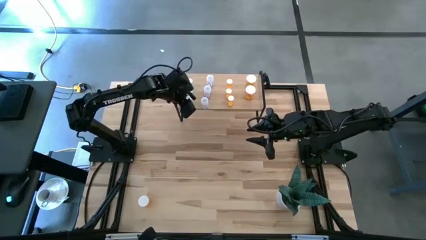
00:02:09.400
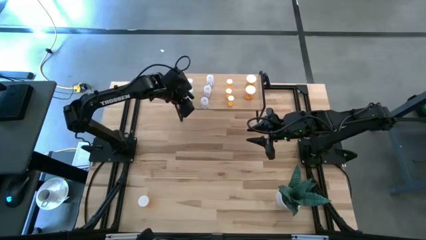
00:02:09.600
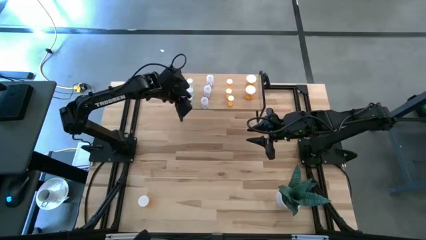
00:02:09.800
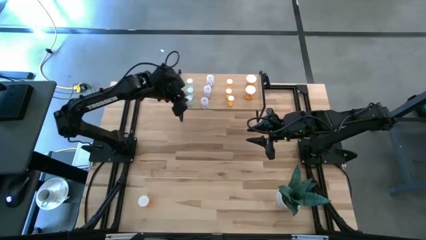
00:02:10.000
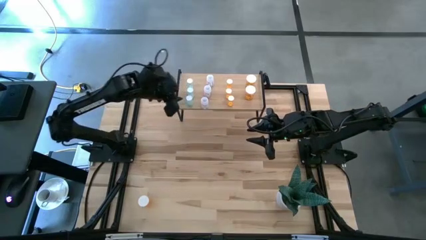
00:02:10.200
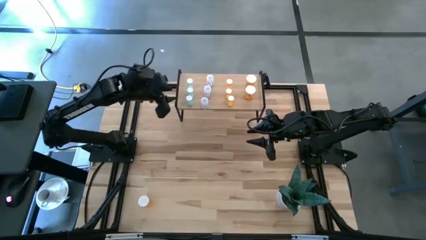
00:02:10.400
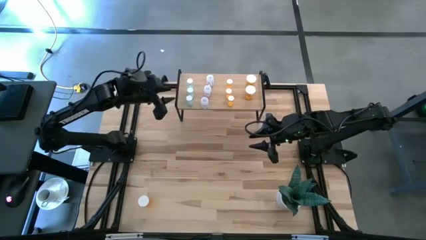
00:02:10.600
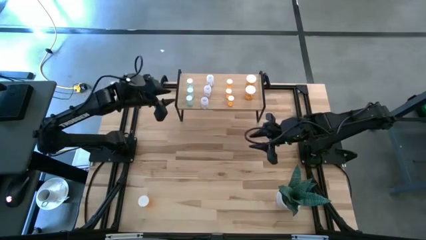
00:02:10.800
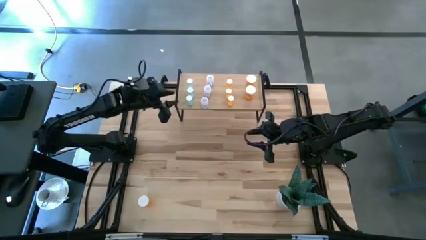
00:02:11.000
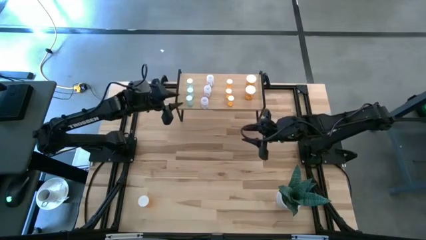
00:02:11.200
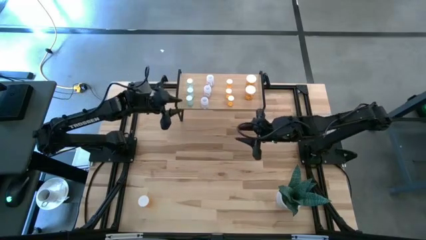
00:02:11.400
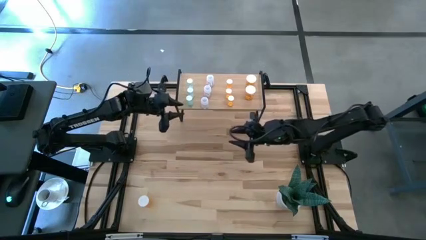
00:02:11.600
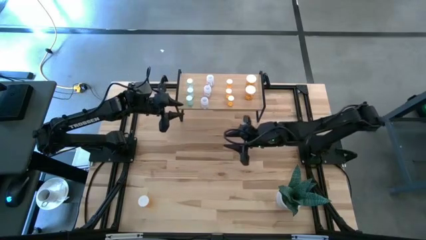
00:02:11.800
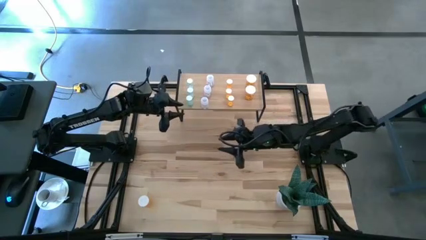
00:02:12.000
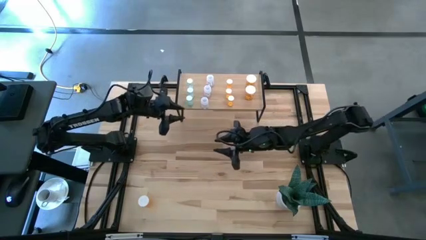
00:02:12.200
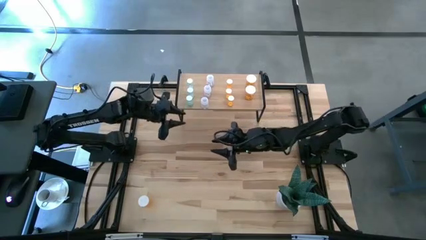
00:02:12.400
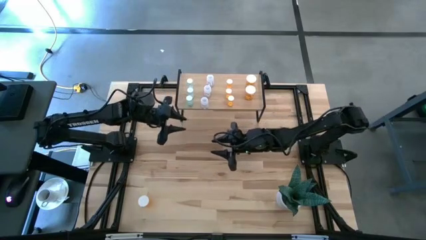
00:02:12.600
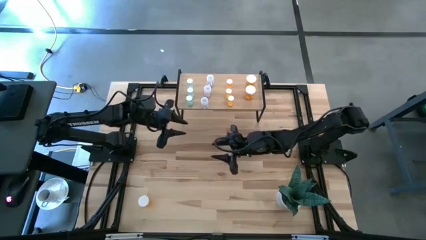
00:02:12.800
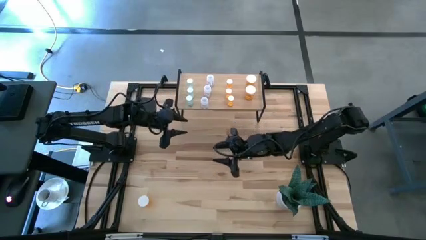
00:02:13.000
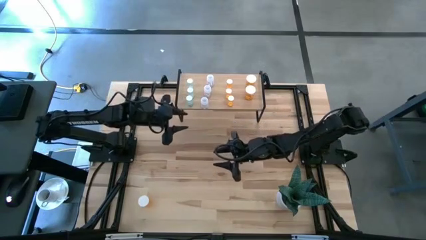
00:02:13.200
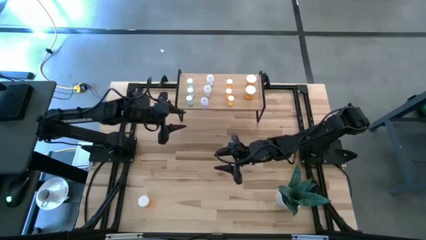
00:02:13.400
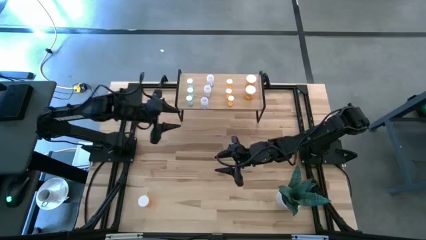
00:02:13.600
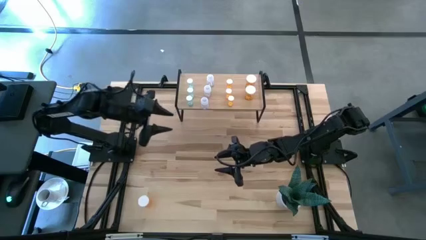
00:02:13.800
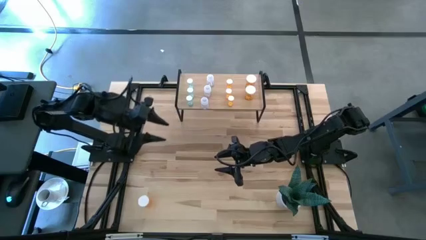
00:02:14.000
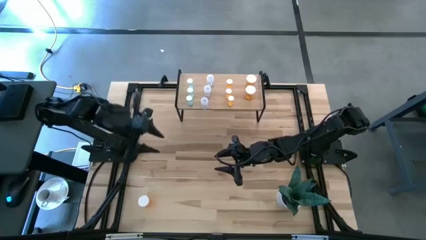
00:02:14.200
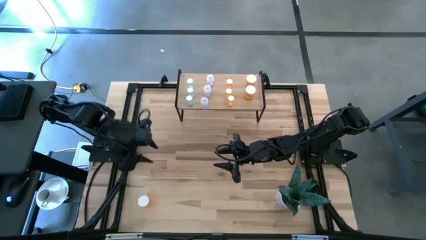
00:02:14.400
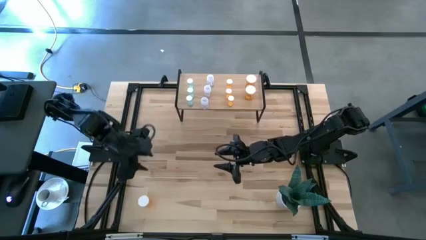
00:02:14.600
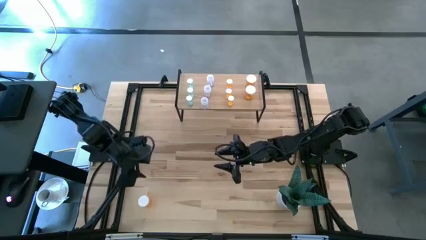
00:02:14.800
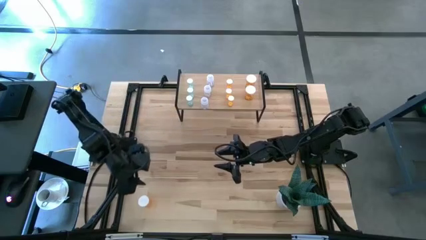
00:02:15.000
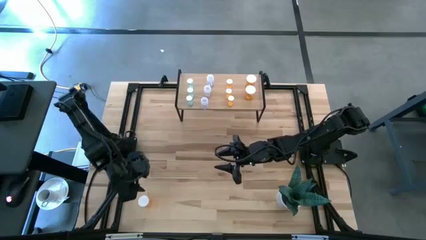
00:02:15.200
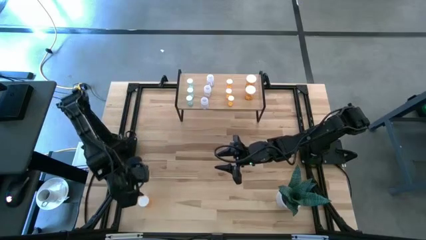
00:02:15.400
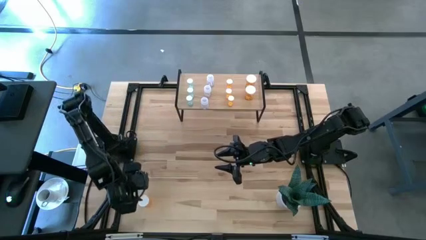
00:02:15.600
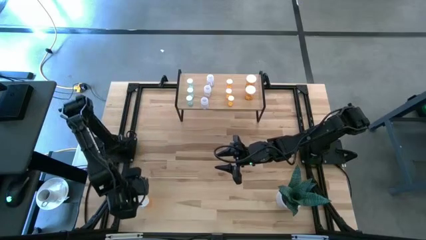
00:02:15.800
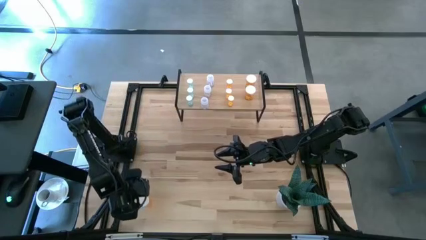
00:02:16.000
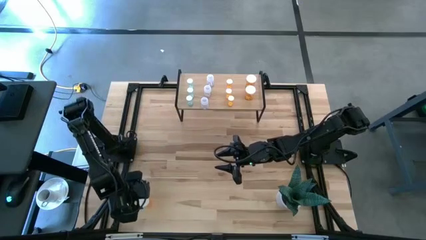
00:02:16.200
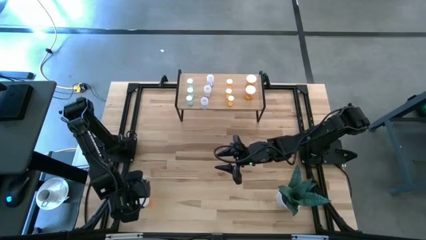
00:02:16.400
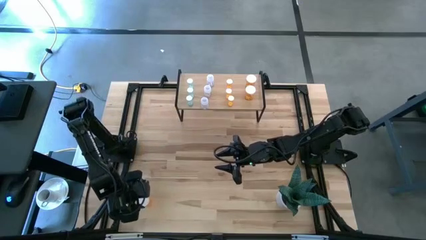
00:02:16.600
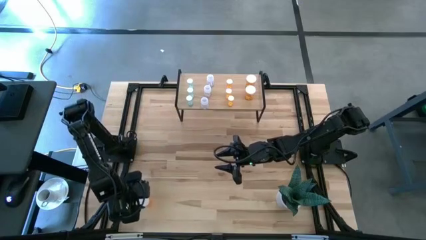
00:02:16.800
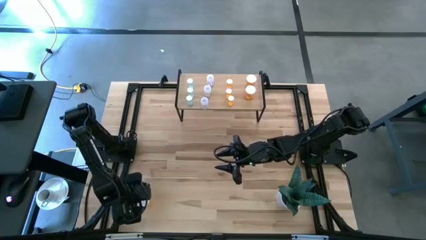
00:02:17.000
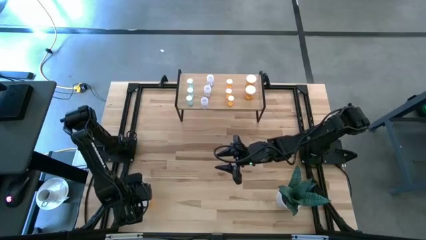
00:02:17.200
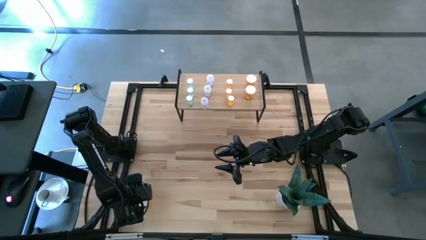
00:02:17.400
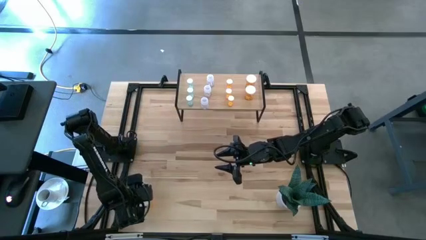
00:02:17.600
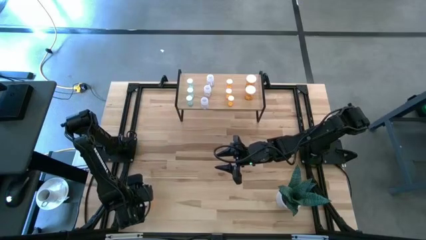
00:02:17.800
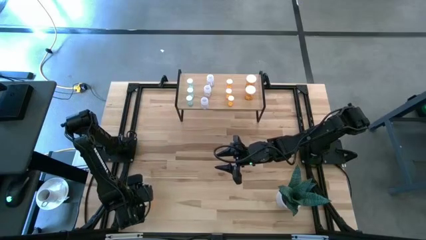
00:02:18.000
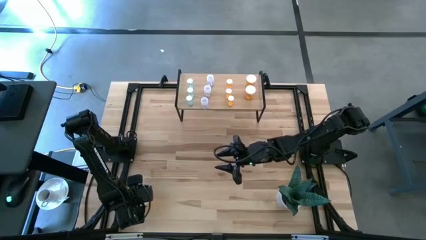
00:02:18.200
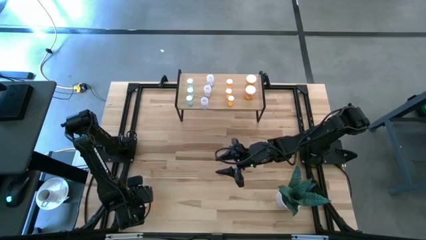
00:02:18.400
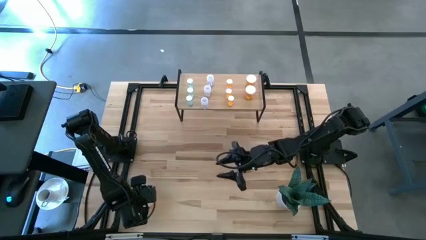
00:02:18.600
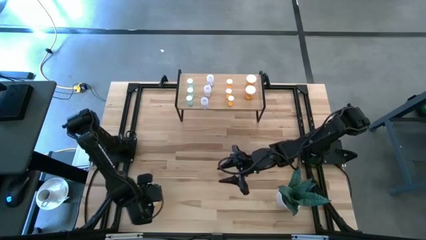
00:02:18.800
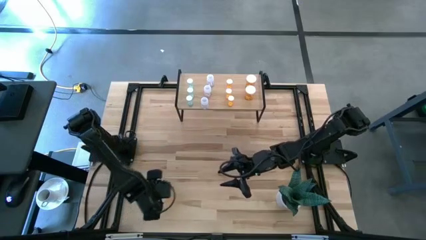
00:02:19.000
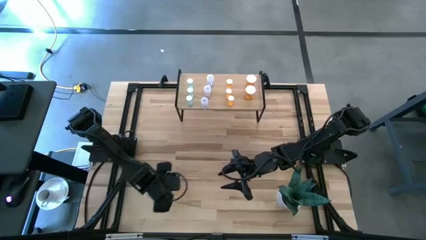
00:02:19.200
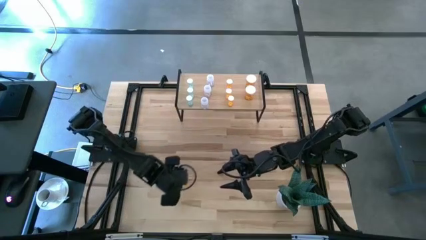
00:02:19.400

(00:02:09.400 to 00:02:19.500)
Task: Pick and place medicine bottles onto shelf by color
Put the large orange pill bottle on the shelf aligned with the other large orange pill bottles

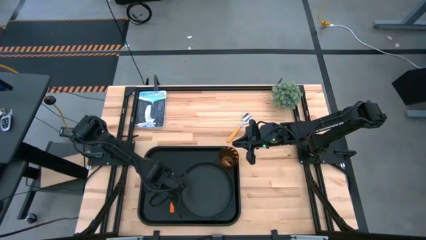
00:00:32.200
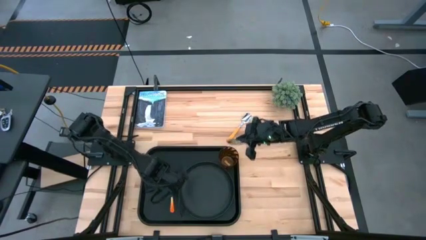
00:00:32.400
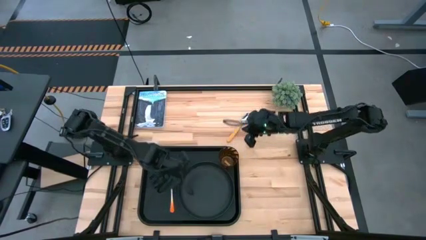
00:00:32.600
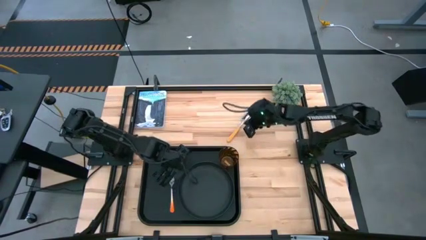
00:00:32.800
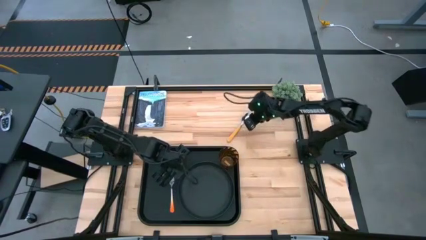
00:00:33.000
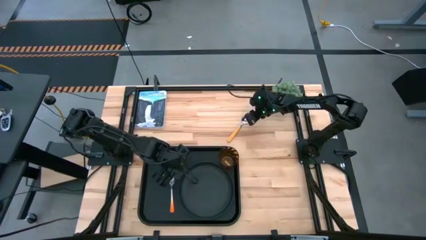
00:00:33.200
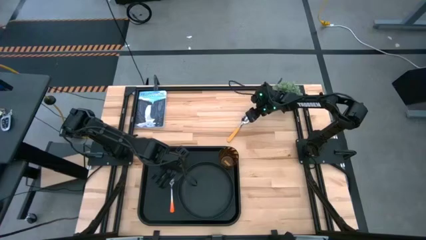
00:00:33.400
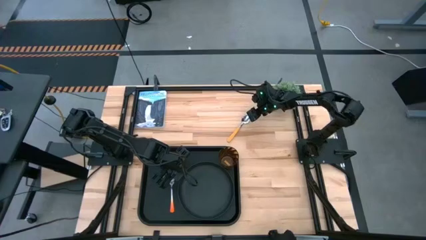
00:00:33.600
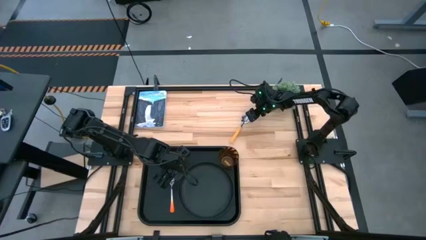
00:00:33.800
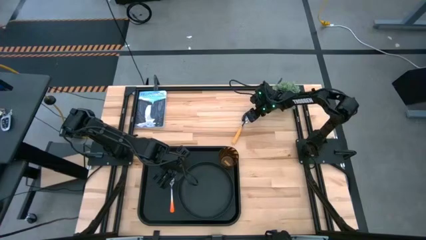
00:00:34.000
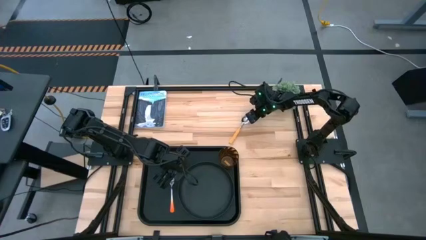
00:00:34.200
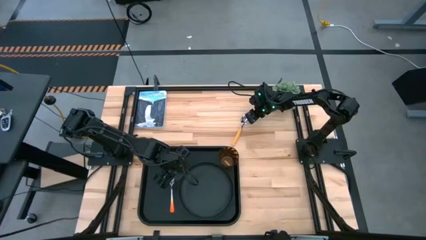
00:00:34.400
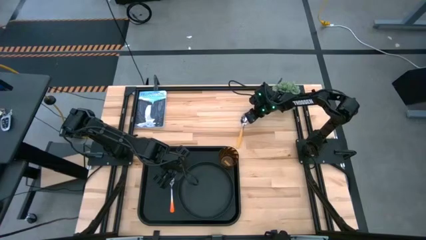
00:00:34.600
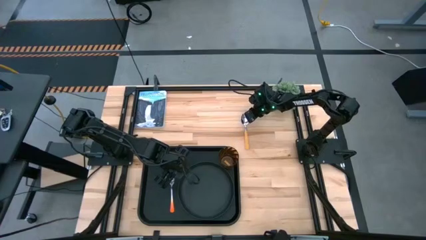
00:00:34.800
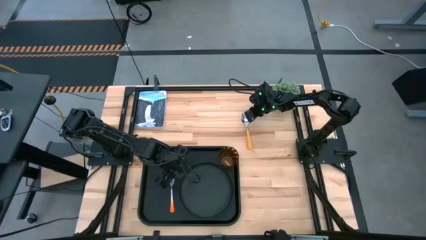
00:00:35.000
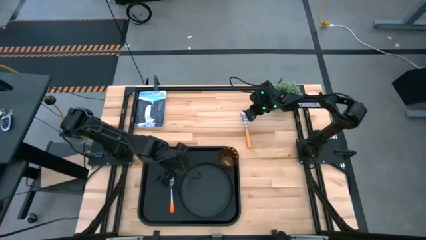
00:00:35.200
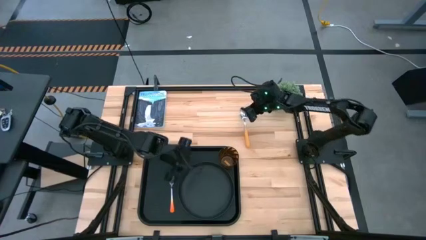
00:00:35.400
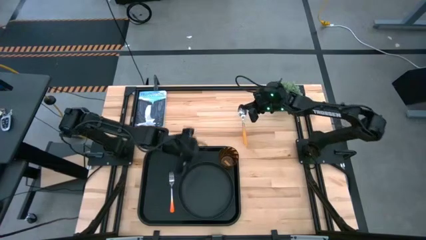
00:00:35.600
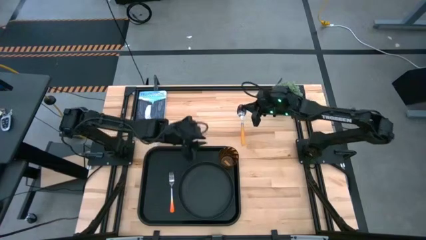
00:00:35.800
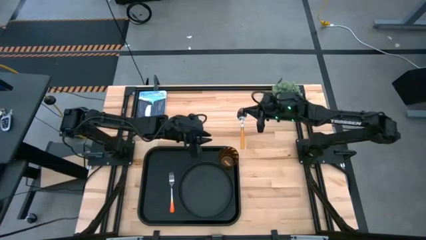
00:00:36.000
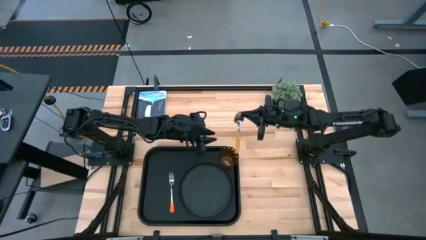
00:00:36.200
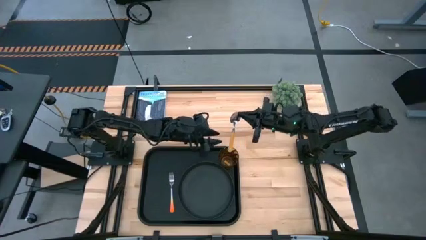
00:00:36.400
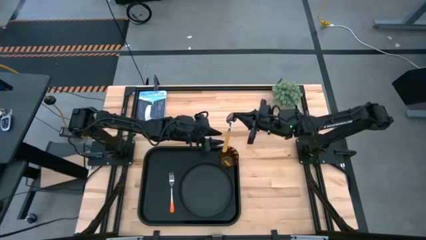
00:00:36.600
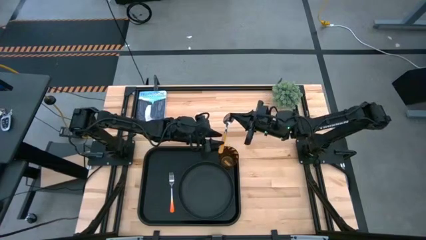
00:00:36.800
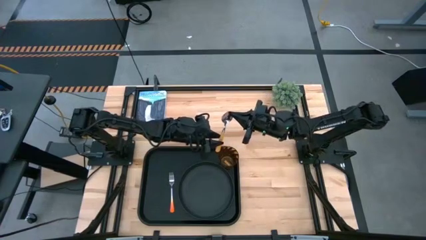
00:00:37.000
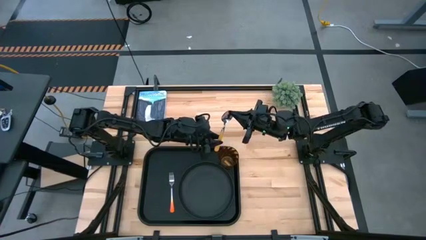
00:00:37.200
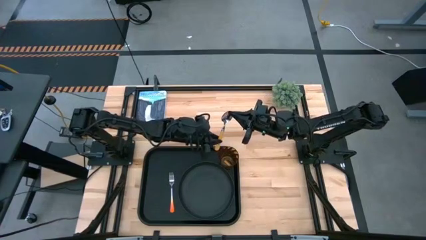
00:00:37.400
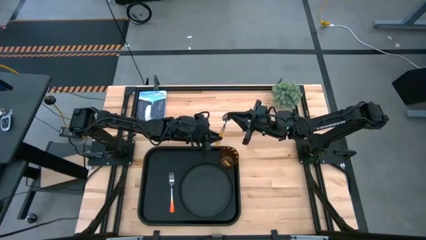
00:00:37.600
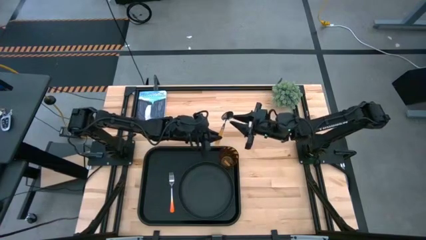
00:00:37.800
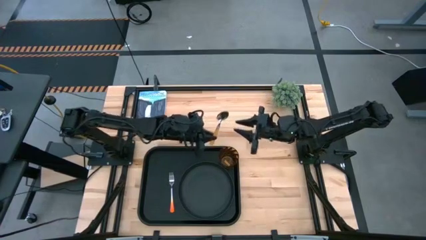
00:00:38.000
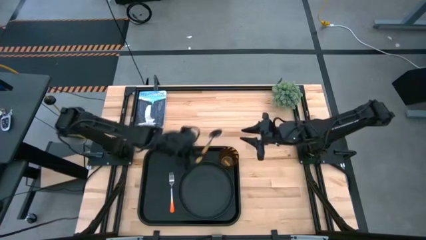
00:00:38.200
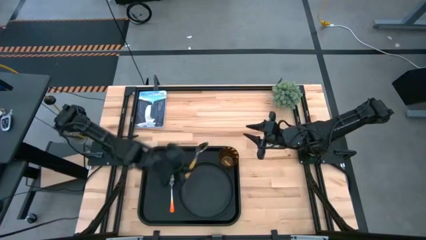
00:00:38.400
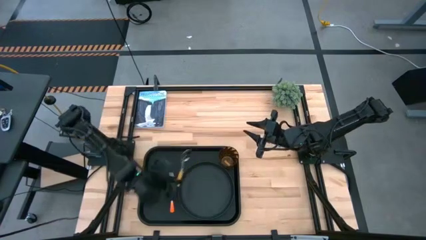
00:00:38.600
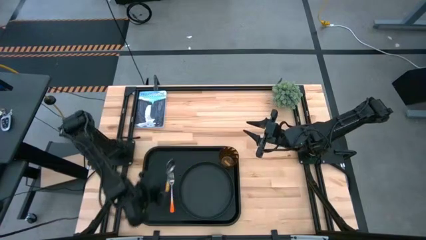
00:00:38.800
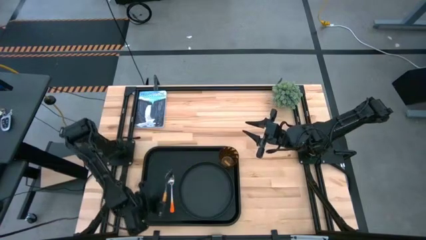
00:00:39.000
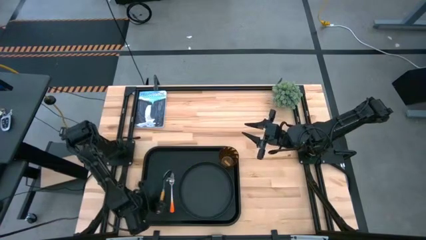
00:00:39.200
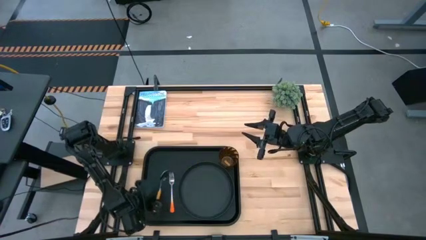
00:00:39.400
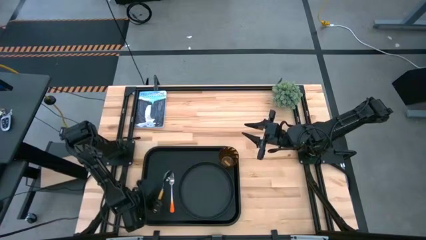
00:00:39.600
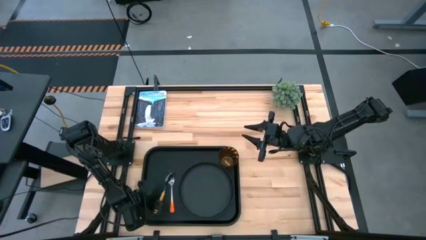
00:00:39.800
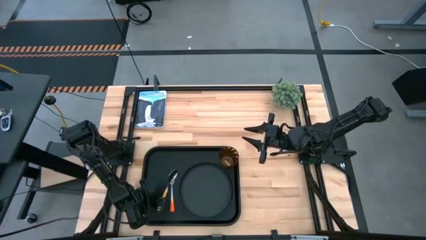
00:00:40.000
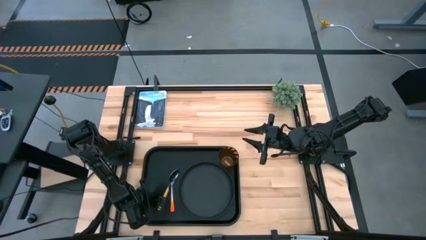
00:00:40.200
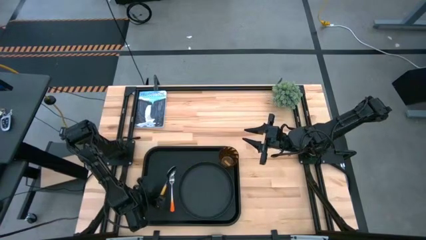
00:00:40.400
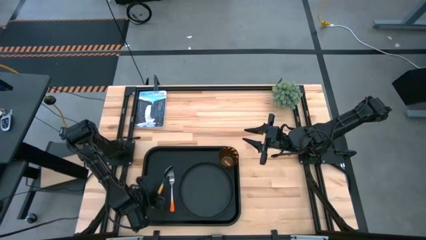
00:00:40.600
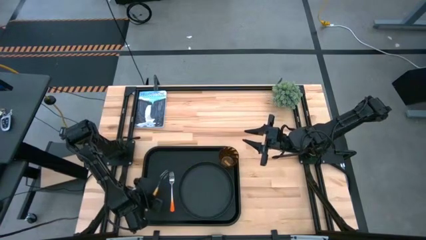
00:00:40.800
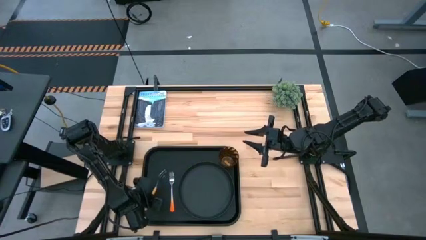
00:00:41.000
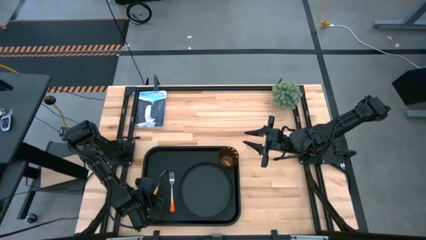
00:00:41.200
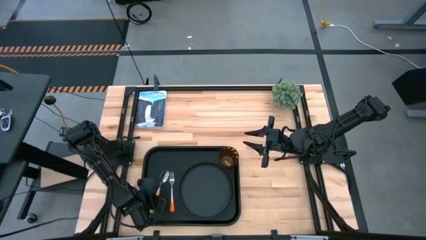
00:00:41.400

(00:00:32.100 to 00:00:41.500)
Task: Pick and place plate/cup/fork/spoon on tray
Put the yellow spoon on the black tray to the left of the orange fork
